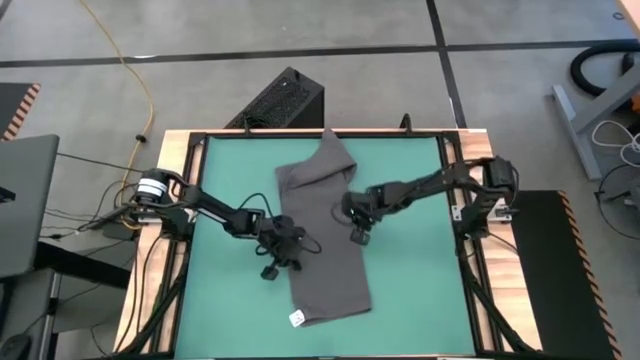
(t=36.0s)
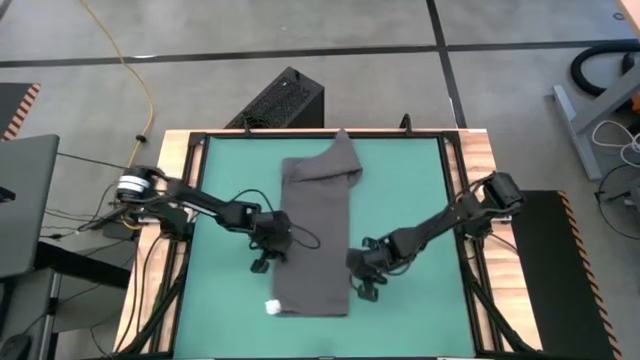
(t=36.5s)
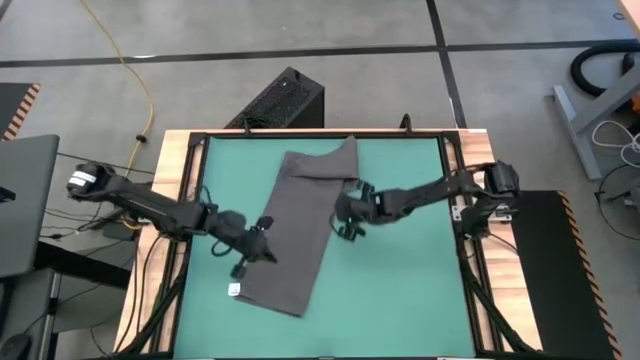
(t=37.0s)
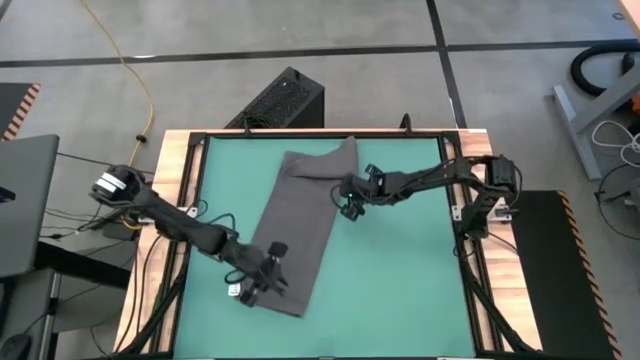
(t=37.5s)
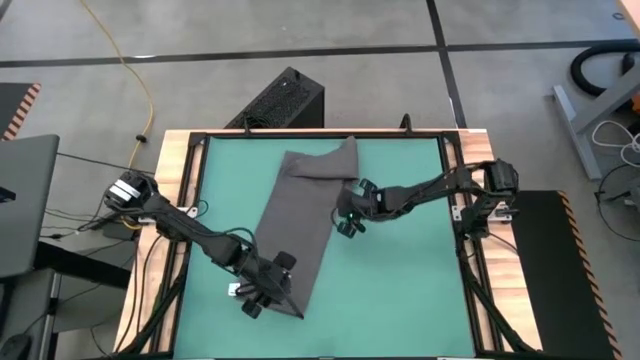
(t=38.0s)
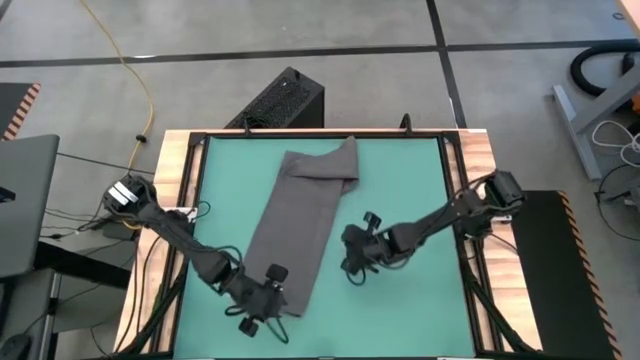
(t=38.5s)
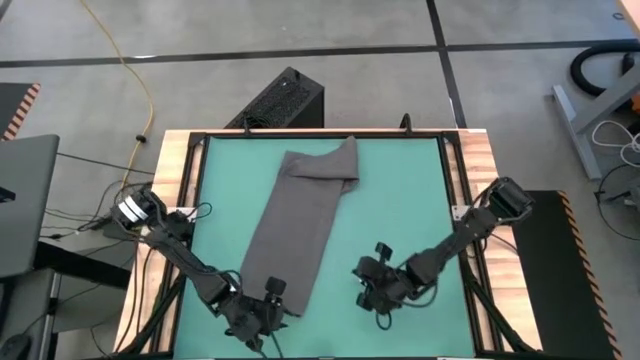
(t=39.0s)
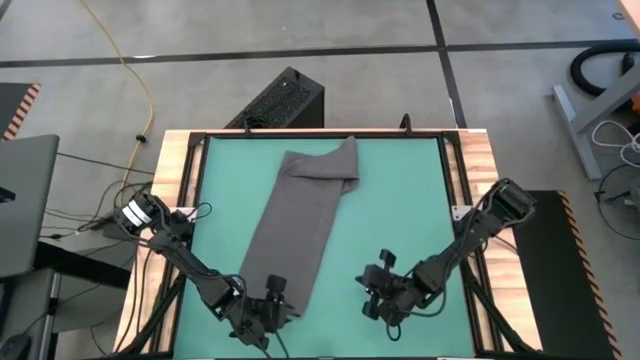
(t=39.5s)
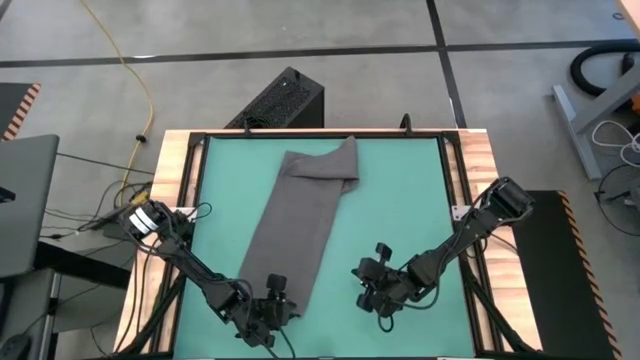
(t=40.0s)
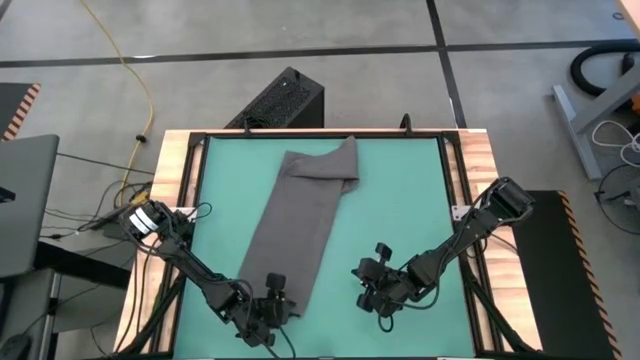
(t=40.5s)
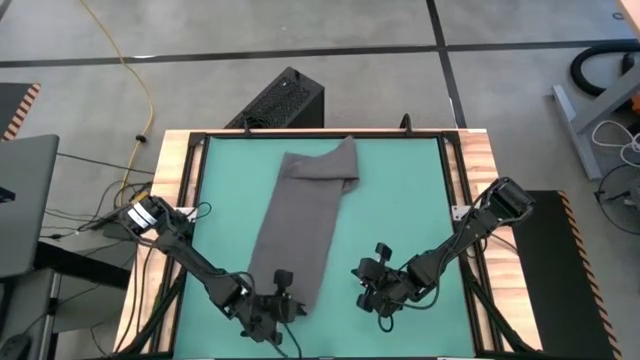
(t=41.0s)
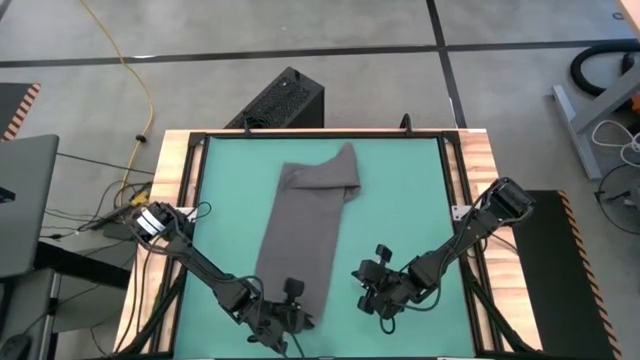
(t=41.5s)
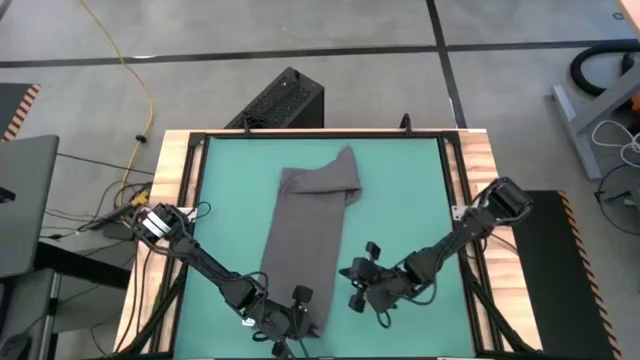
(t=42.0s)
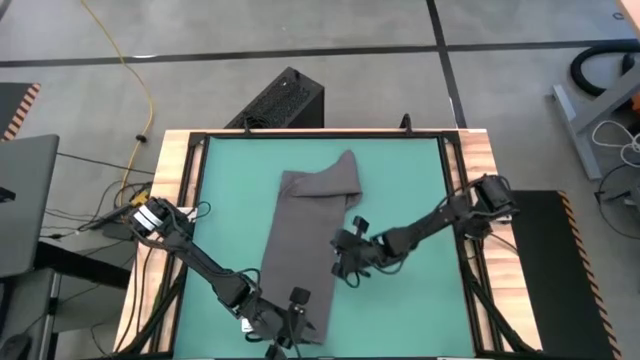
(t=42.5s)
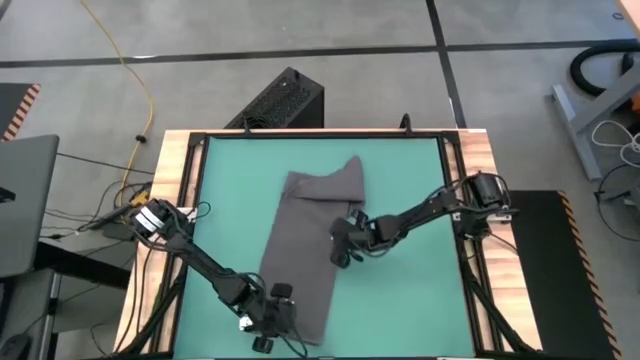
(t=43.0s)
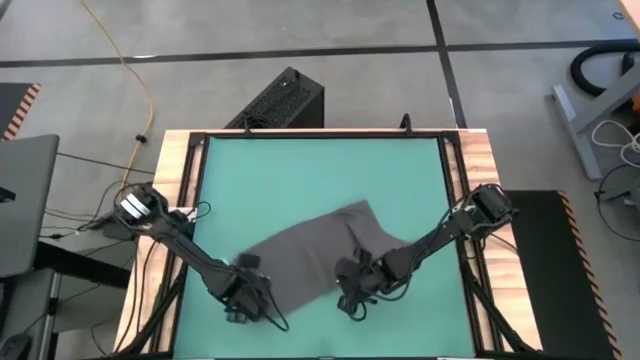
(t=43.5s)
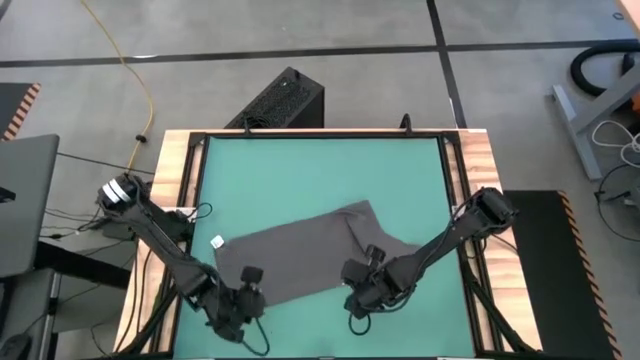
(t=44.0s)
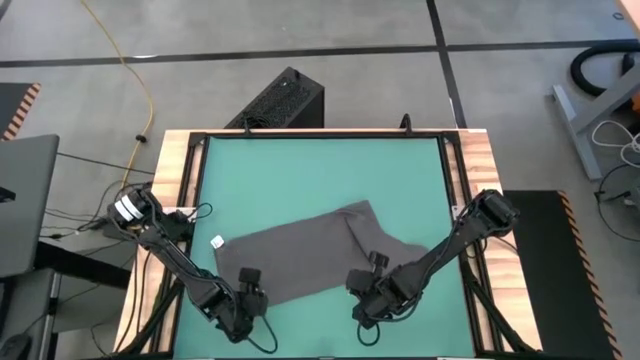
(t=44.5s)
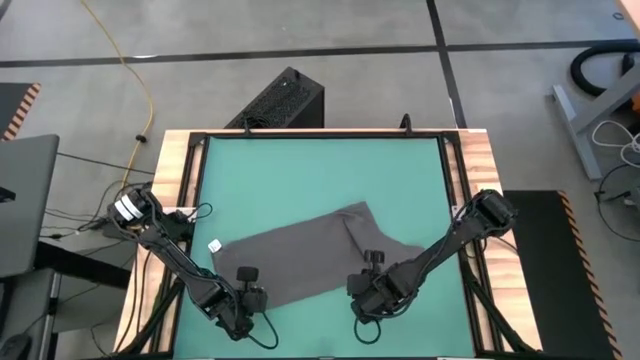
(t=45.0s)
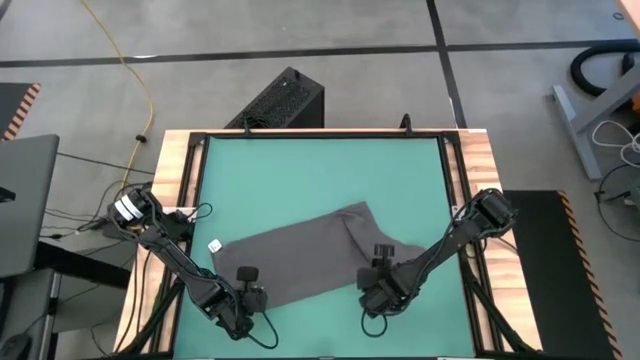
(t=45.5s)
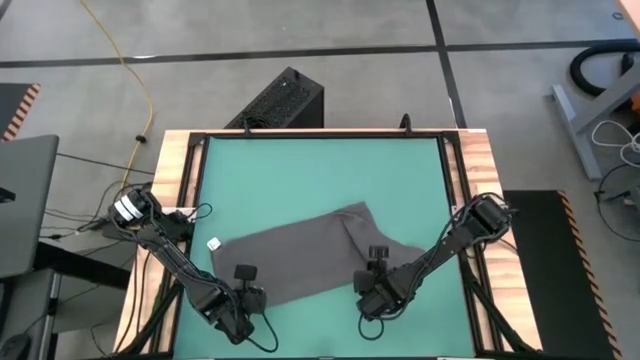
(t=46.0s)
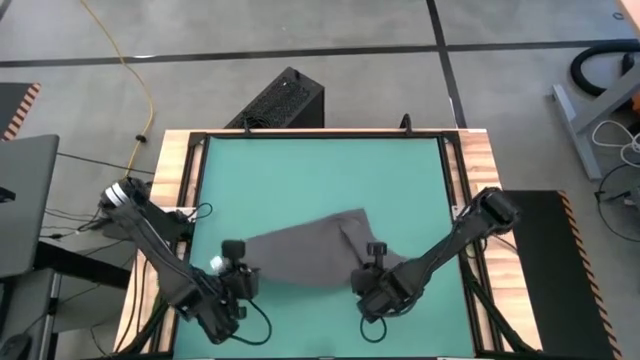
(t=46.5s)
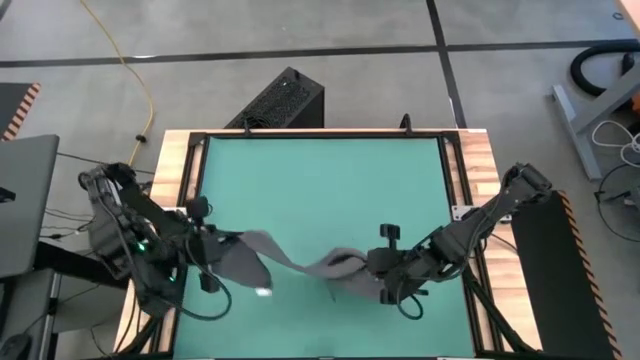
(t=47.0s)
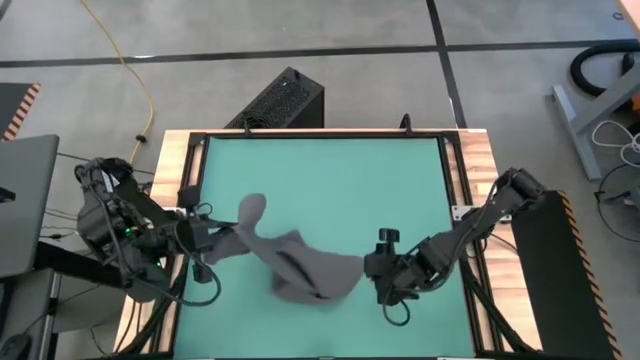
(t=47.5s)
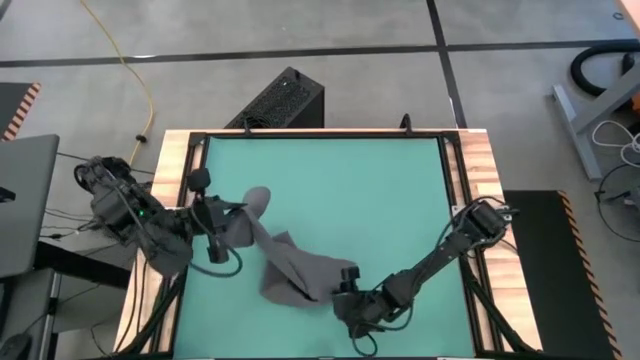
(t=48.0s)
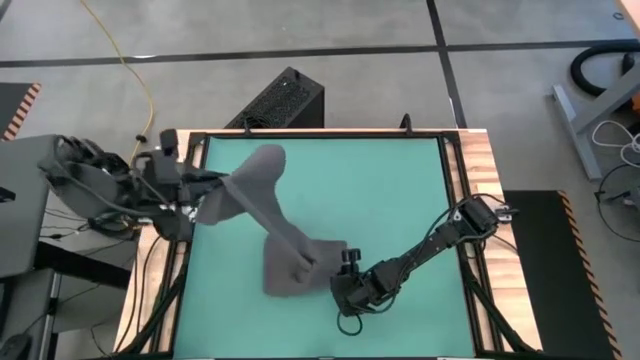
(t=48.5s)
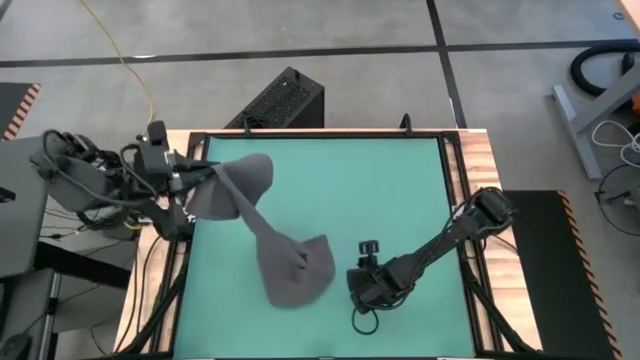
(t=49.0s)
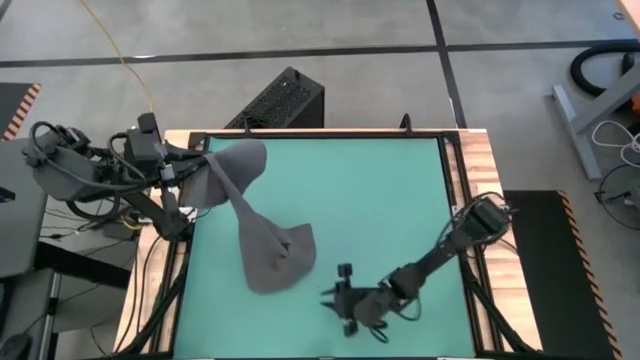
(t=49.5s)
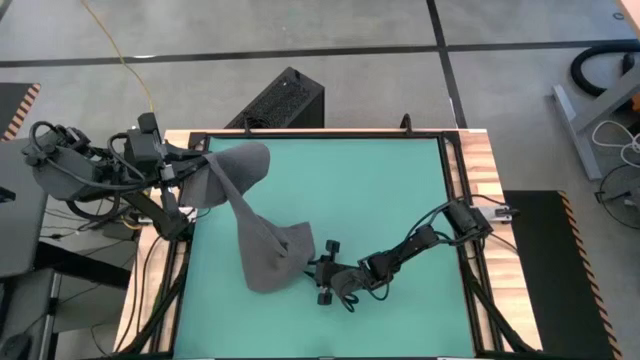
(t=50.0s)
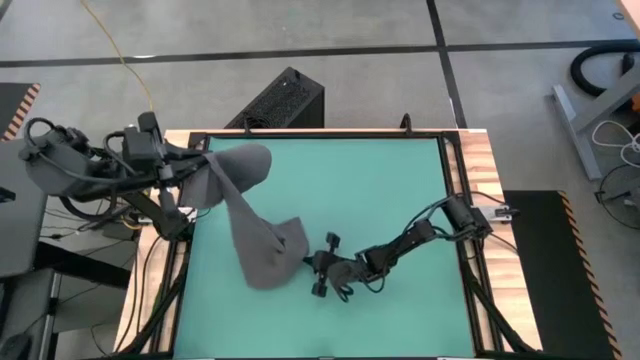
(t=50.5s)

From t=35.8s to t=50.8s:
Task: Roll towel
Fold the gray towel

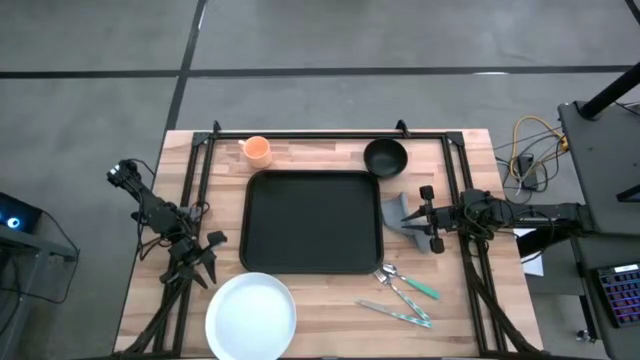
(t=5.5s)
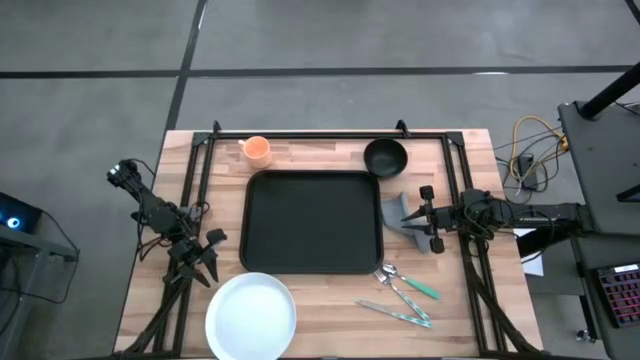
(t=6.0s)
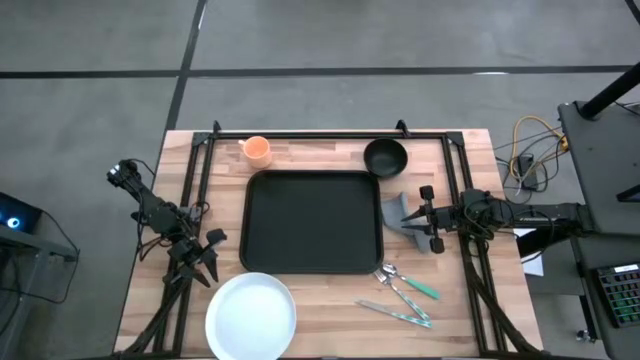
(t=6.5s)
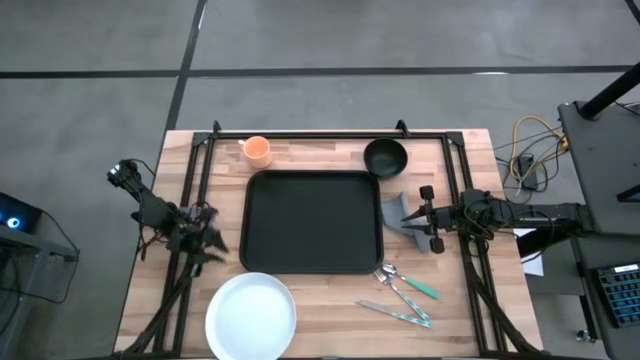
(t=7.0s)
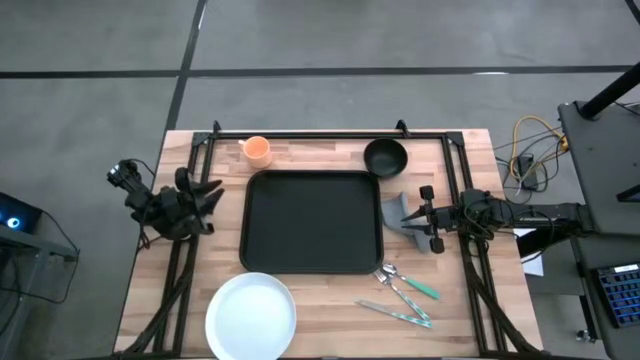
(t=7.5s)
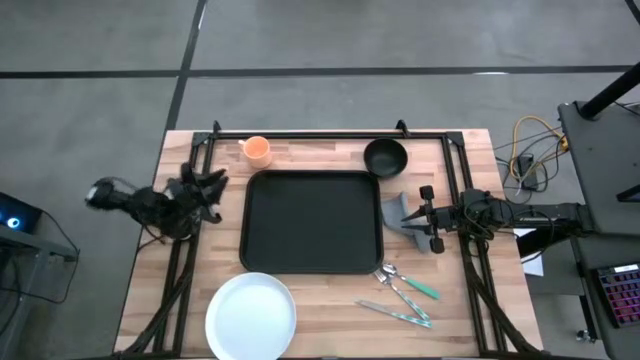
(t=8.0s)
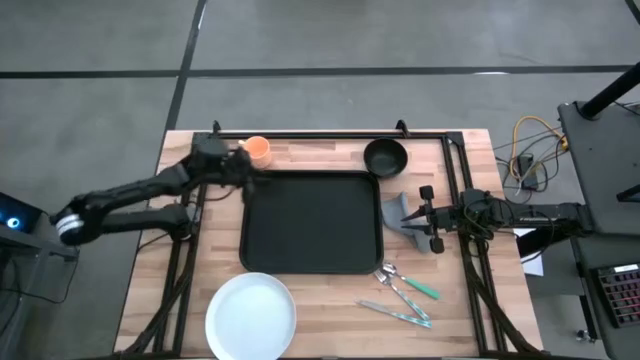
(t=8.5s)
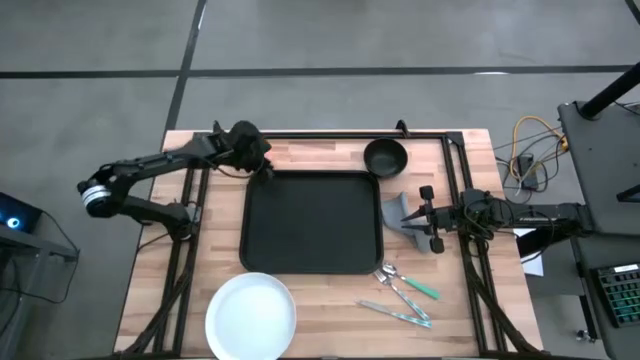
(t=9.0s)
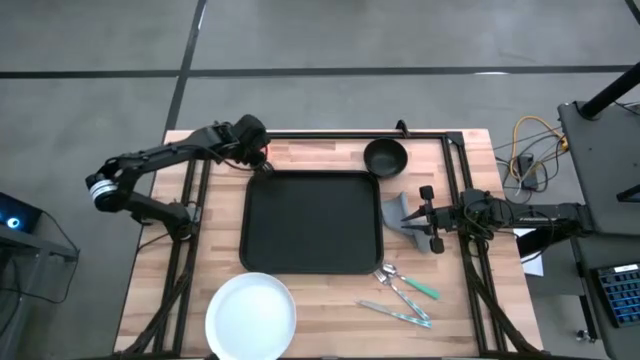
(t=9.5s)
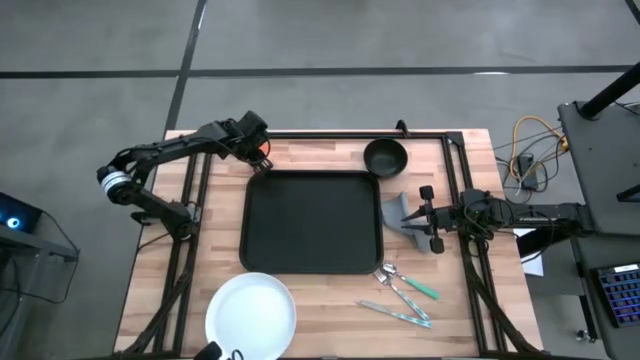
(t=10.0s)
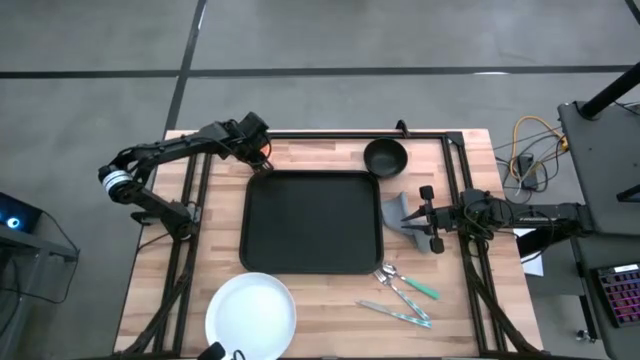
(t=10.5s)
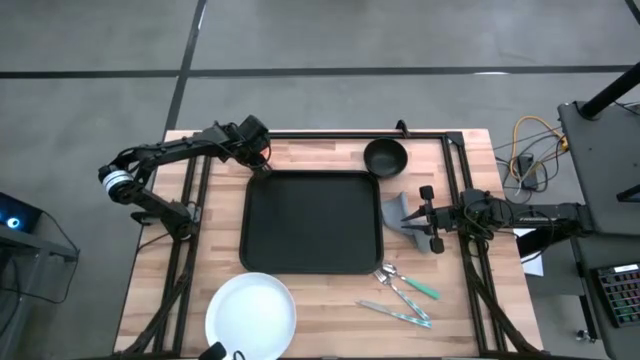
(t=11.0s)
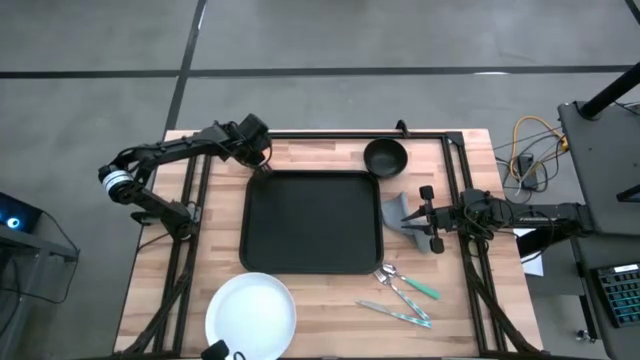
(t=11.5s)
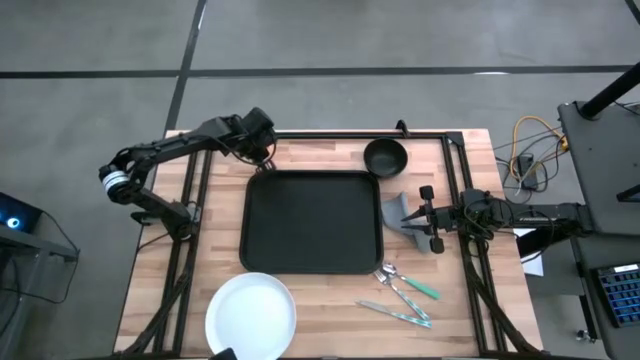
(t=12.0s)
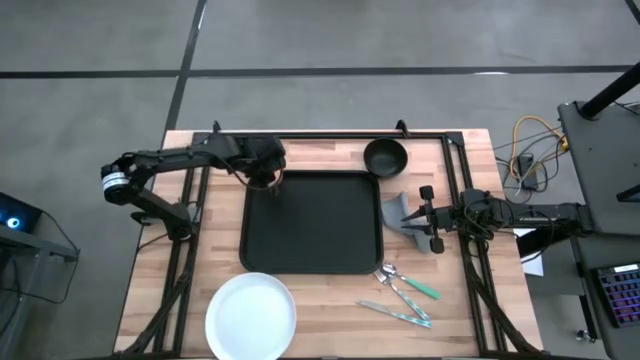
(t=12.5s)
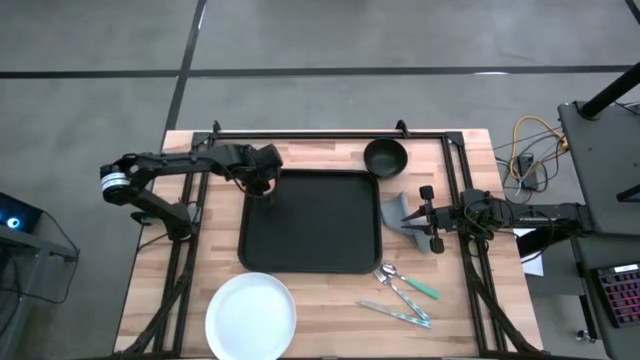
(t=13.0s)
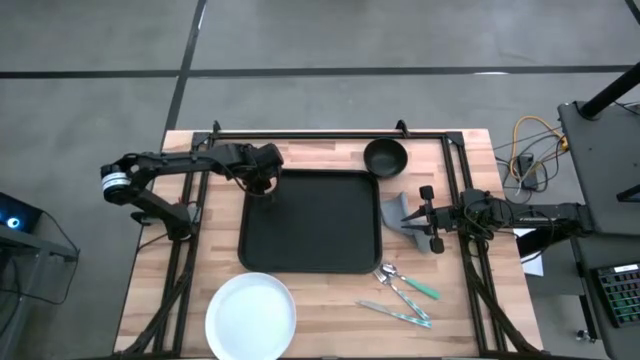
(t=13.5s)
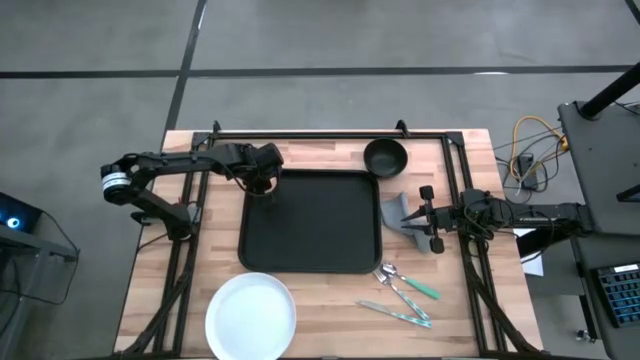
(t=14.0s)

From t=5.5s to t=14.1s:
Task: Set up tray
Put the cup on the top left of the serving tray
